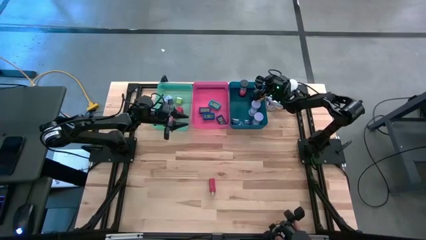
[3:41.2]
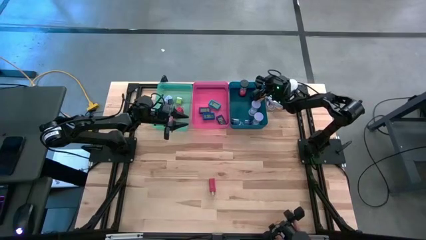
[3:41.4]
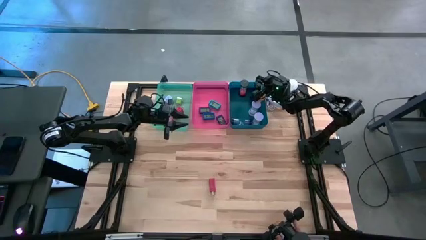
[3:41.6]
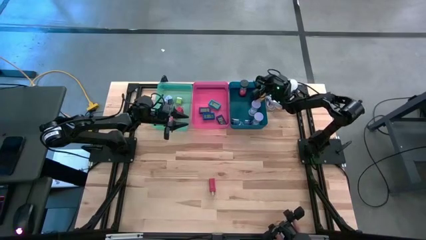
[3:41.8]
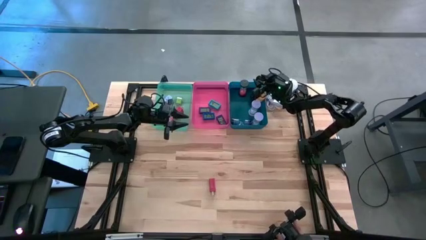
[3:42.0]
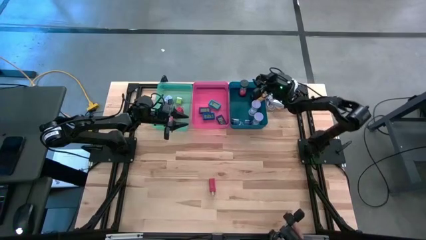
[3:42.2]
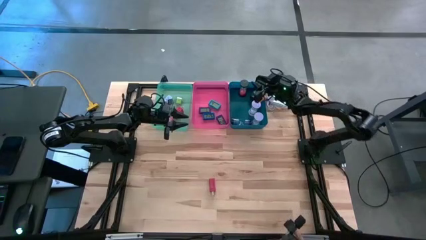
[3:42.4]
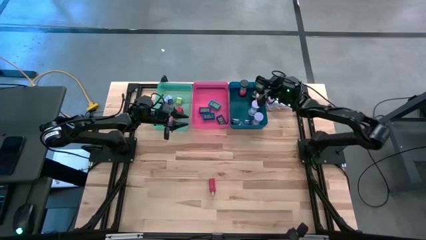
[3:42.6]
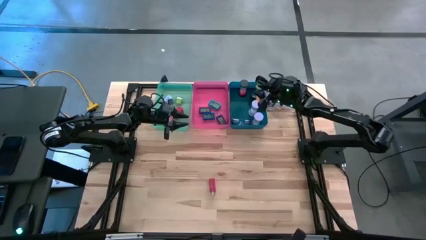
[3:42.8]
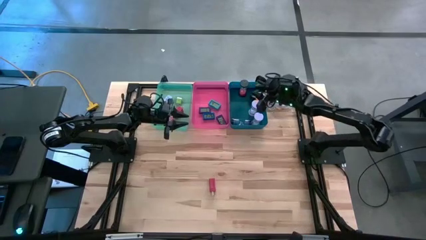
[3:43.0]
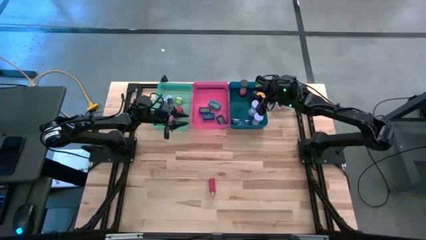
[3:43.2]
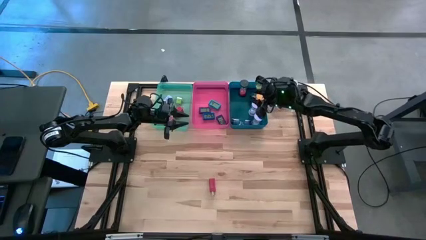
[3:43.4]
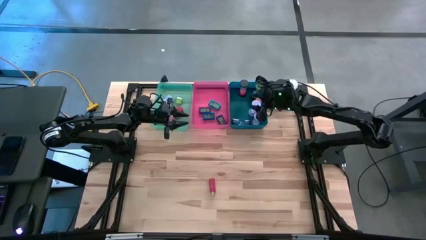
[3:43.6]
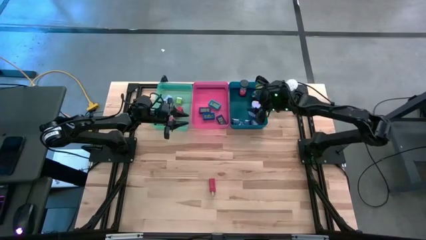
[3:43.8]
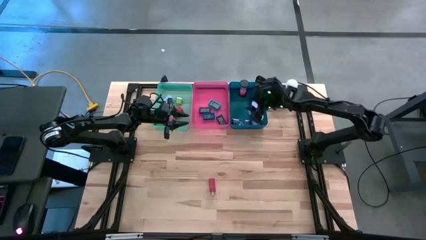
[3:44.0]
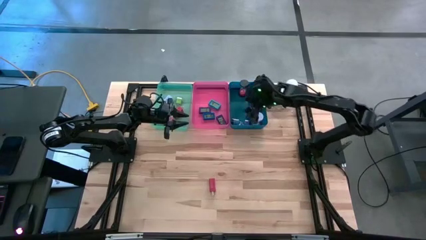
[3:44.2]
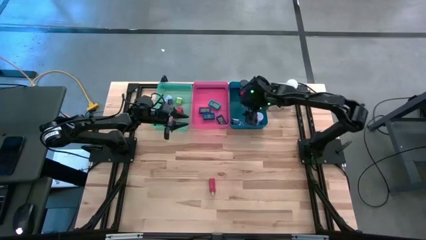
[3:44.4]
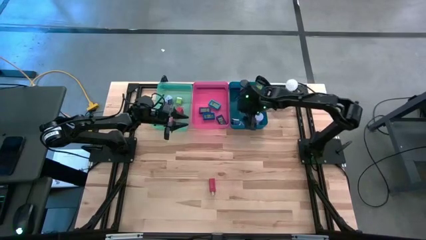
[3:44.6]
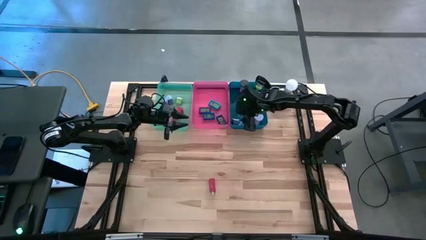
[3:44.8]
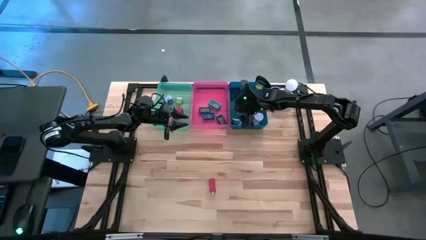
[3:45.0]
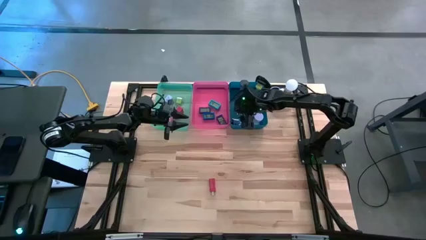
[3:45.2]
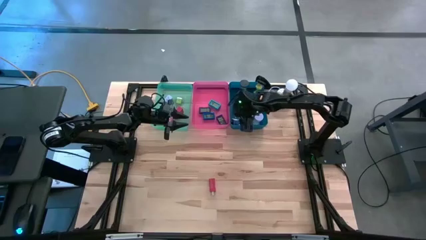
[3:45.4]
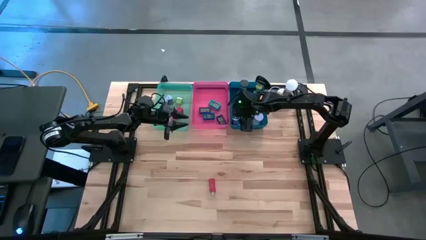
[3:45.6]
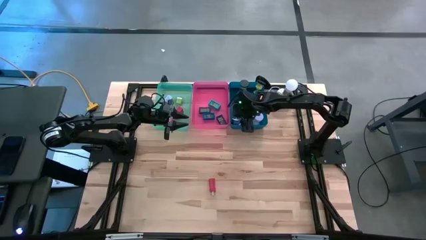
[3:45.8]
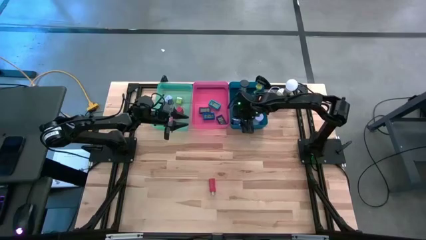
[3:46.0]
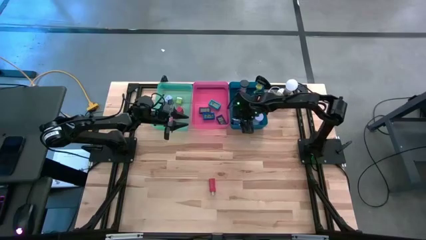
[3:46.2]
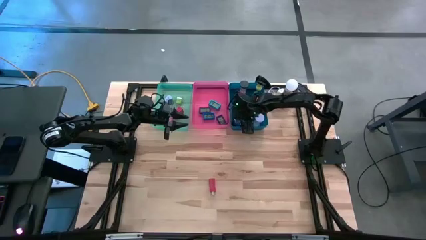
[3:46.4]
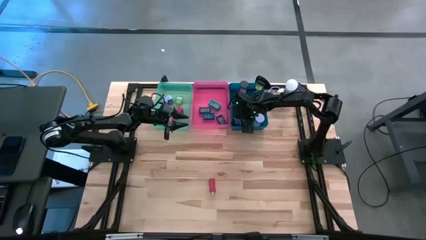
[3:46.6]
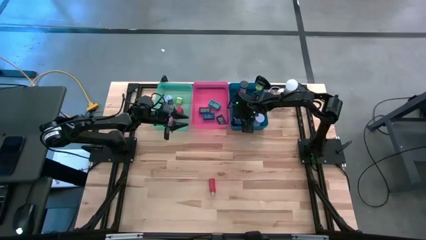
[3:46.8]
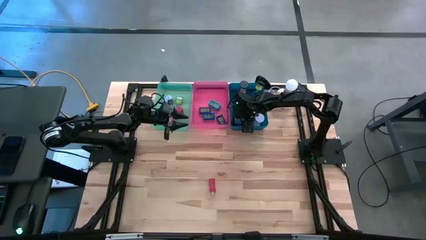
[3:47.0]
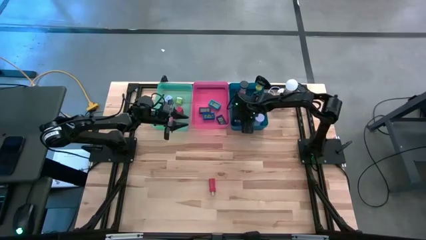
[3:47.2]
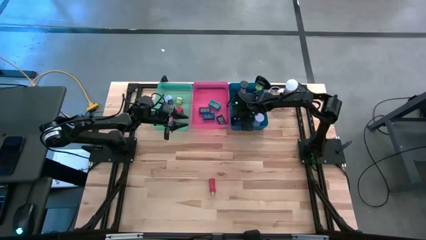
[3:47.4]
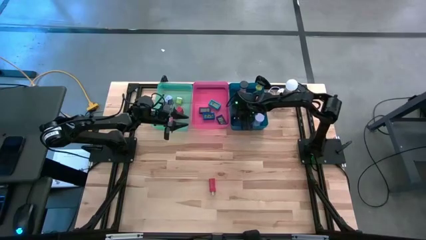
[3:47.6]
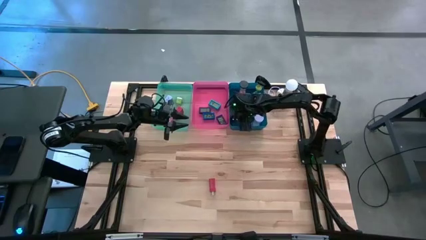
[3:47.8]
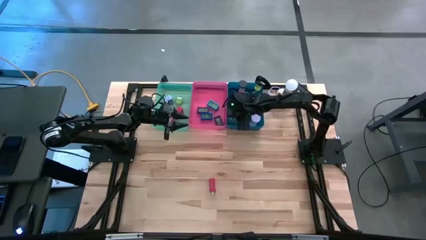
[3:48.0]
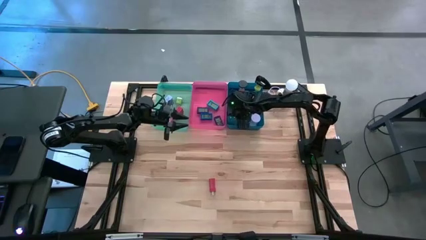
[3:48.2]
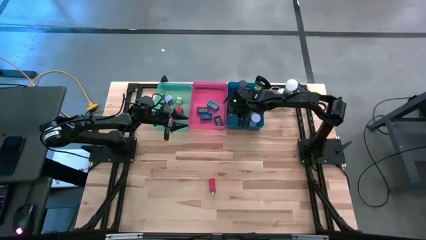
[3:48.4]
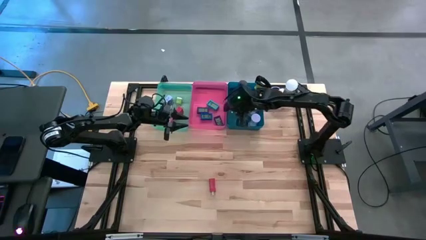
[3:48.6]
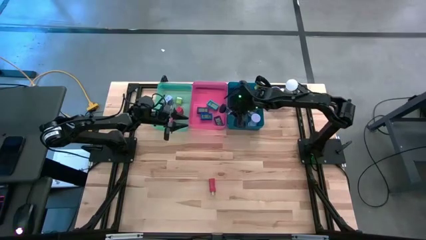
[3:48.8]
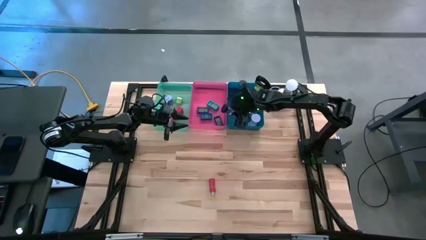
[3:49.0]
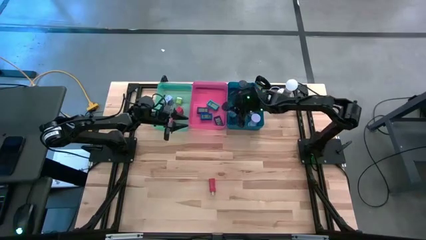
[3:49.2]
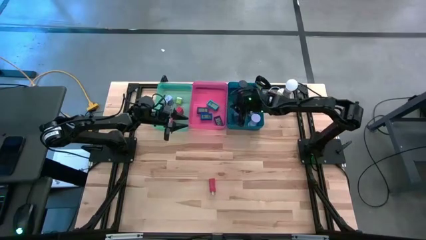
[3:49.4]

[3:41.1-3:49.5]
Task: Pick & Place Office items
Adjust the blue hourglass in the blue bin

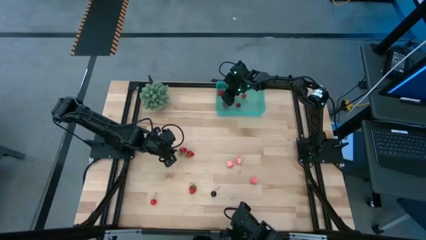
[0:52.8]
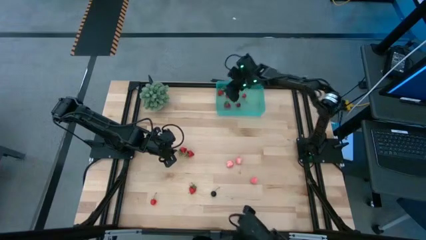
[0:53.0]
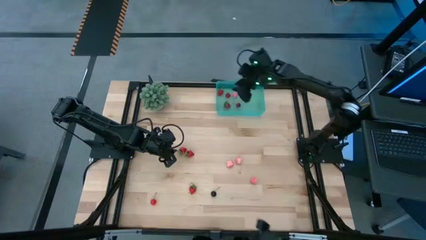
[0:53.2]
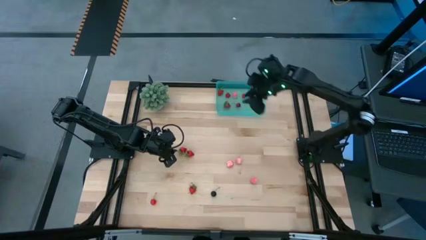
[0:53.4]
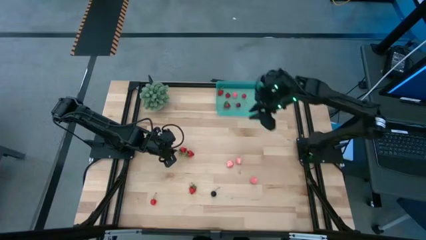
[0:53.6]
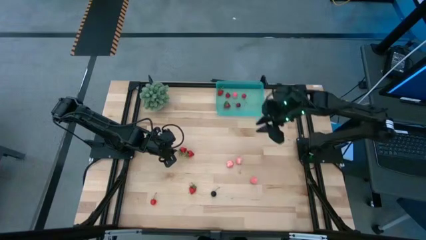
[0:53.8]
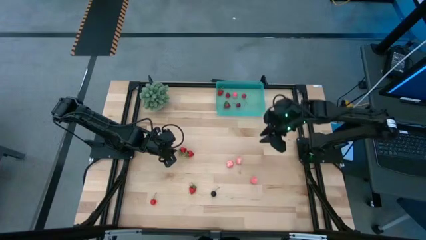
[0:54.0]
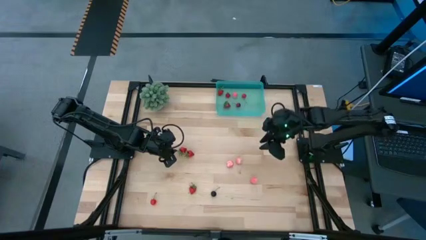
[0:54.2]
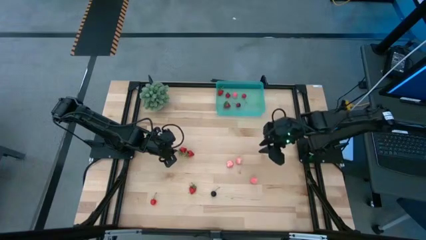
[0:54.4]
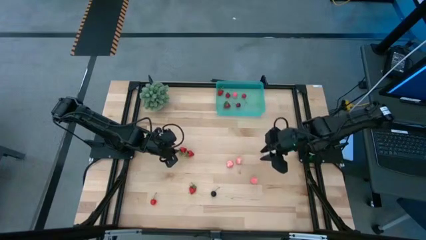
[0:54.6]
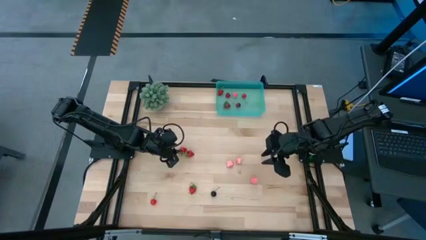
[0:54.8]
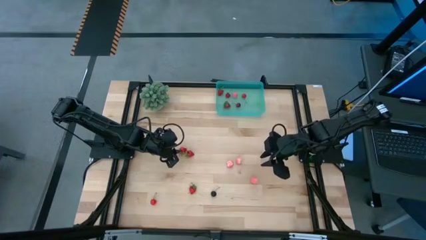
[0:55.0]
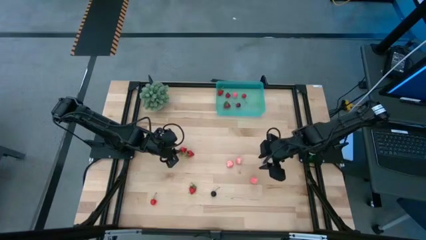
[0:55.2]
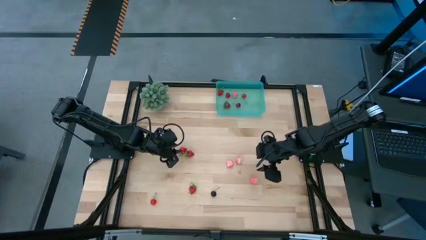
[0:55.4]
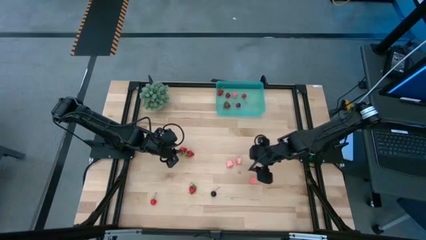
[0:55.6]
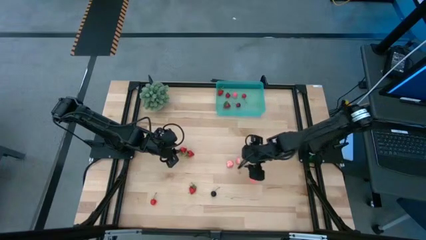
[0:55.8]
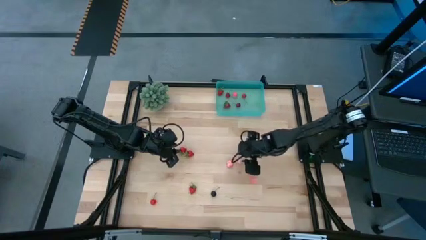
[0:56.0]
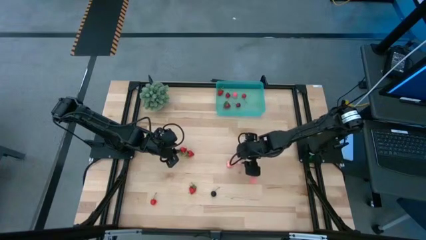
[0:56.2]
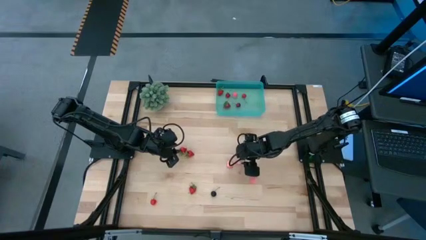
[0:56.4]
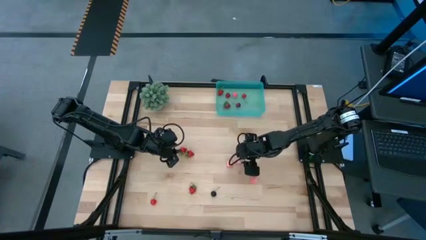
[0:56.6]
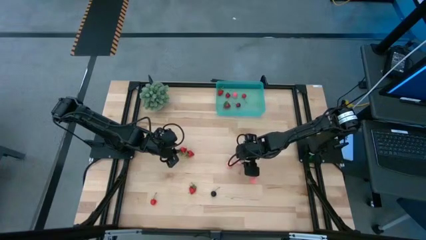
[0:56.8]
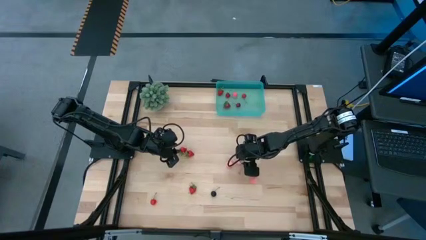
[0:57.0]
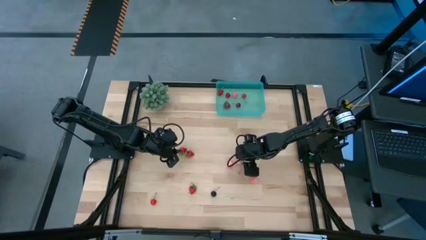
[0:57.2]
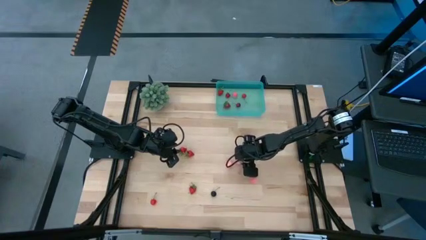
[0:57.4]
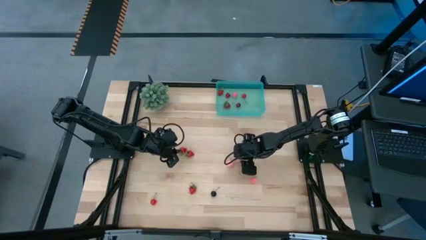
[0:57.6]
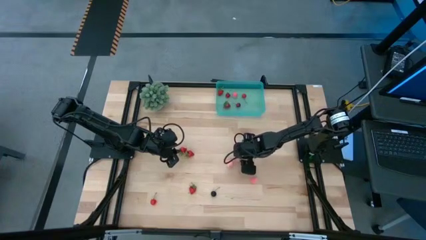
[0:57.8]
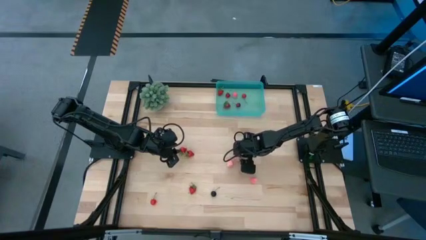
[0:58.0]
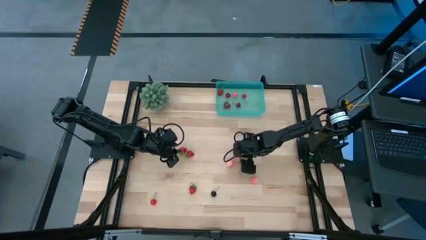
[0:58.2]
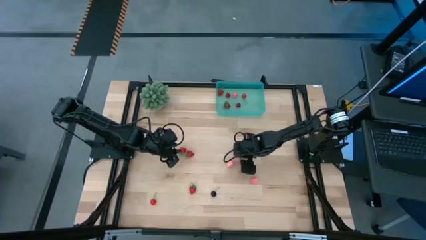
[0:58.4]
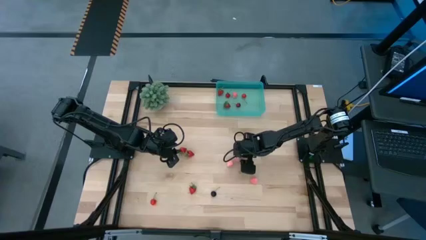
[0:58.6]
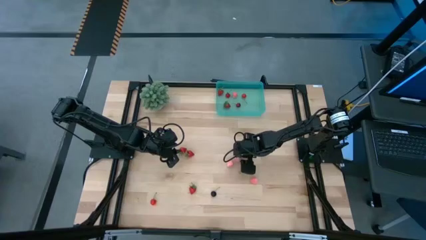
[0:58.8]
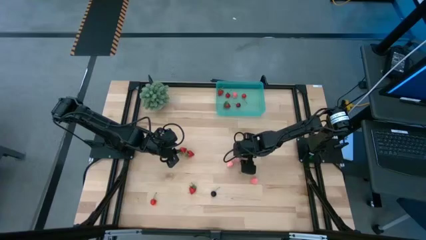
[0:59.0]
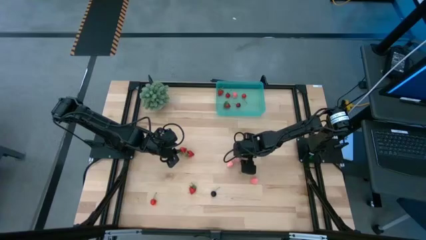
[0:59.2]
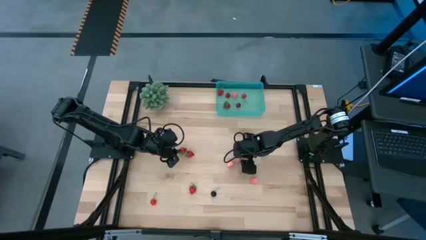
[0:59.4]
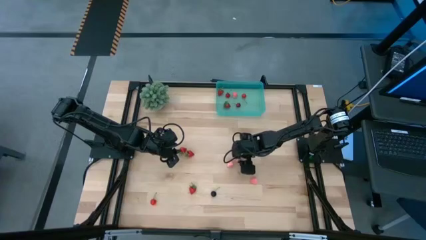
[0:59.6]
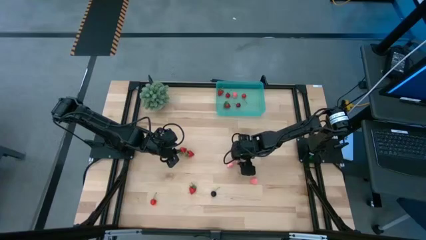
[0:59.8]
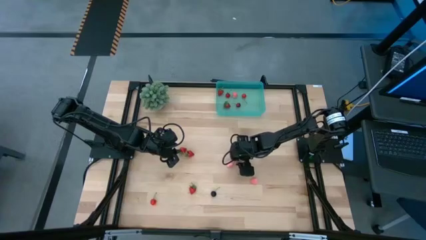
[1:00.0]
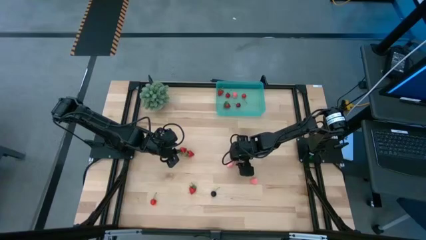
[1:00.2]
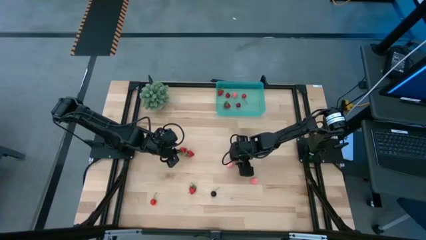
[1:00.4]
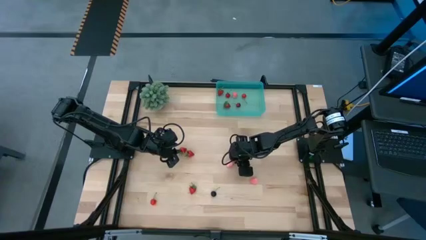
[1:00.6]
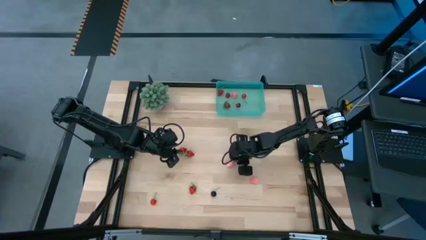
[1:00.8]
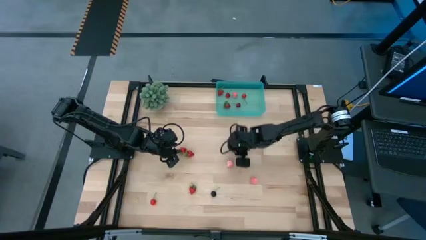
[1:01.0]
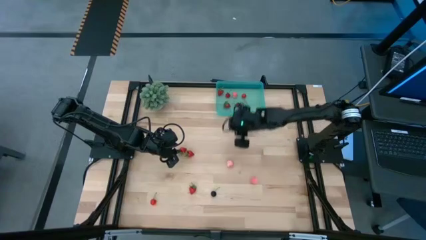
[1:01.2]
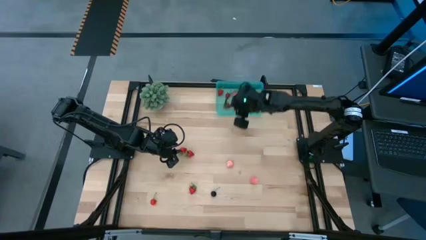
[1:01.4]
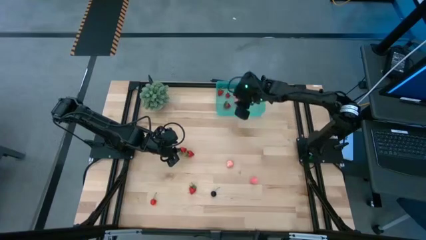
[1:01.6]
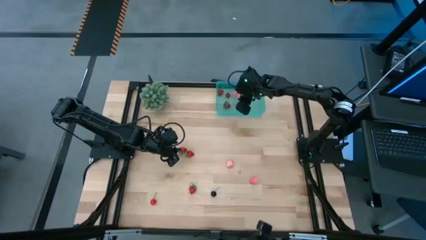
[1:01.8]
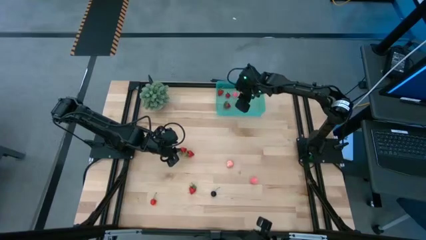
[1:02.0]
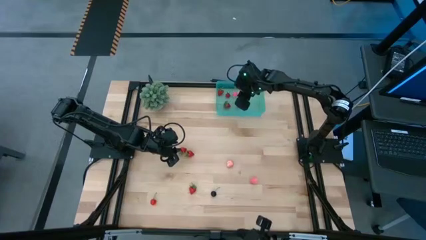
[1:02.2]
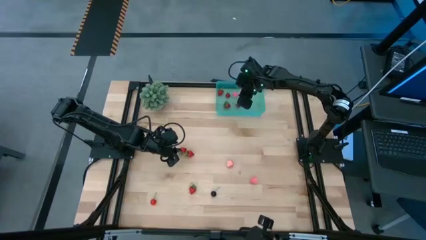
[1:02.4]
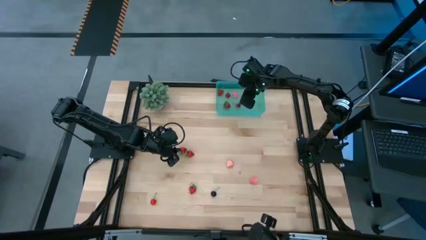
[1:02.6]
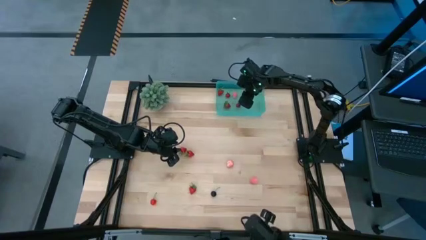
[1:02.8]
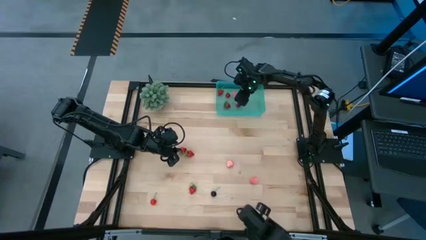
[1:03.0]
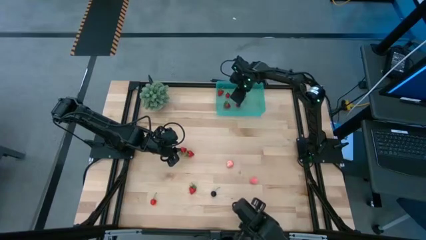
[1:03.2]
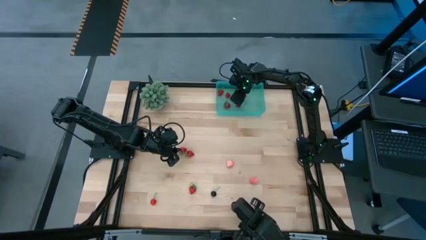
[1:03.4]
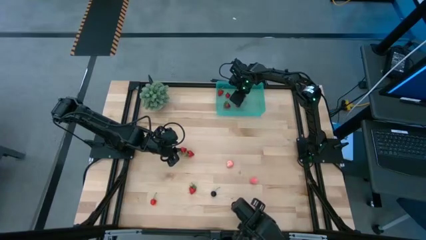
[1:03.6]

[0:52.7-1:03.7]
Task: Pick and placing Produce into tupperware
Put the peach into the blue bin
